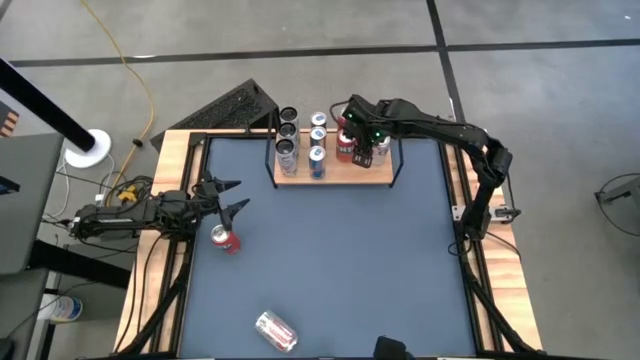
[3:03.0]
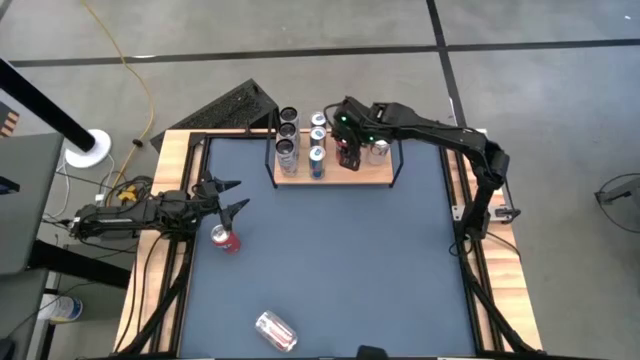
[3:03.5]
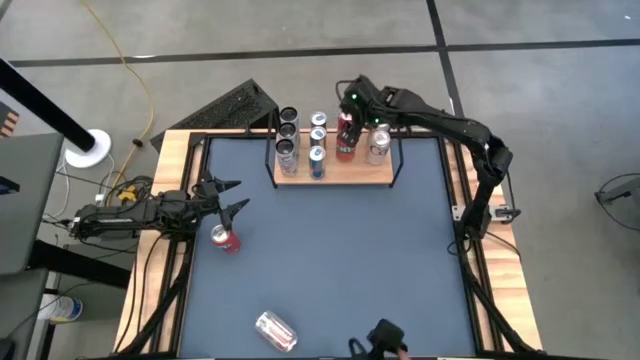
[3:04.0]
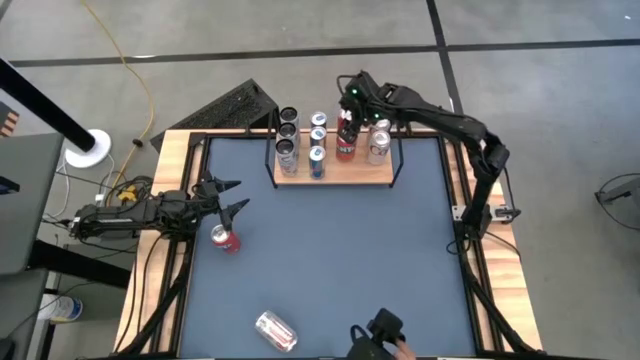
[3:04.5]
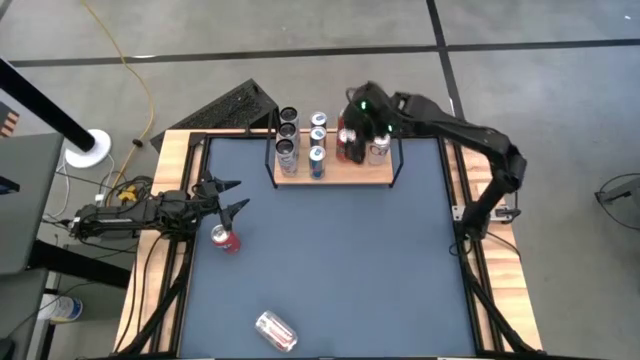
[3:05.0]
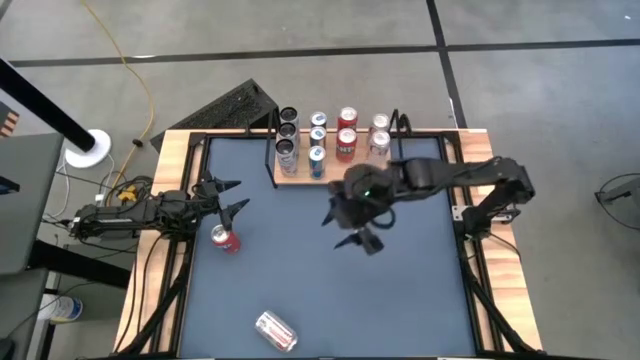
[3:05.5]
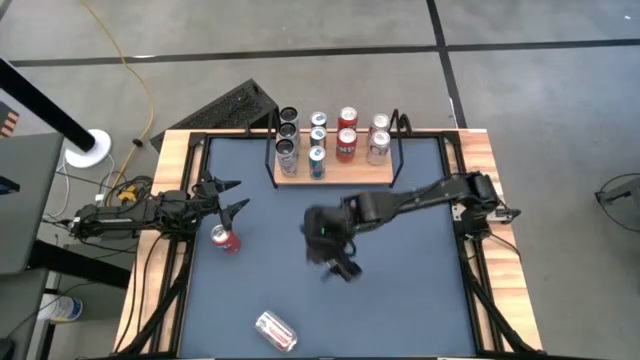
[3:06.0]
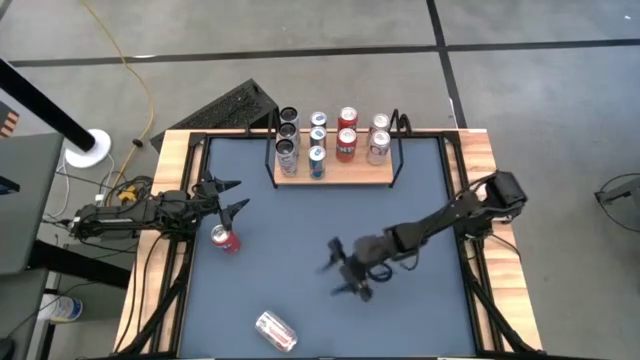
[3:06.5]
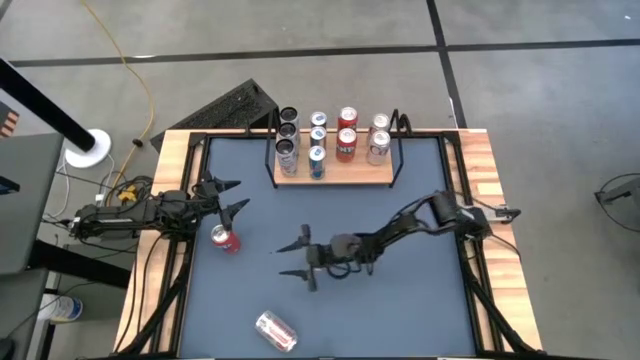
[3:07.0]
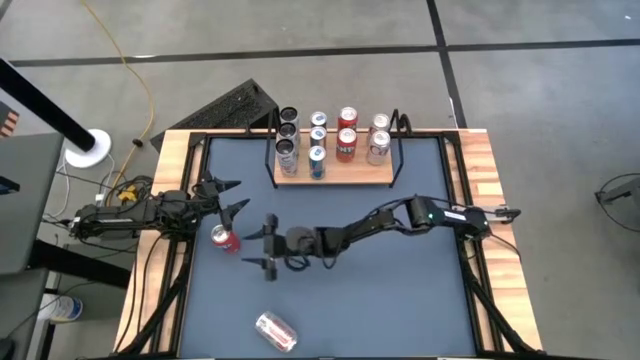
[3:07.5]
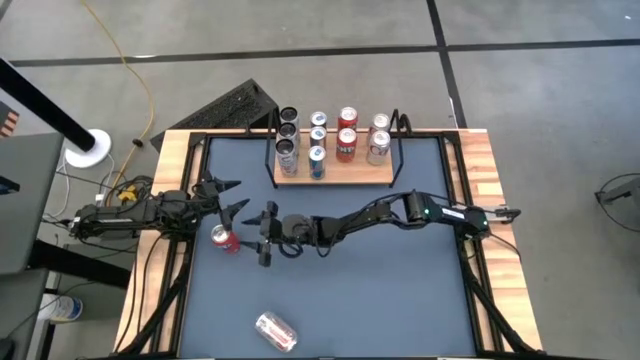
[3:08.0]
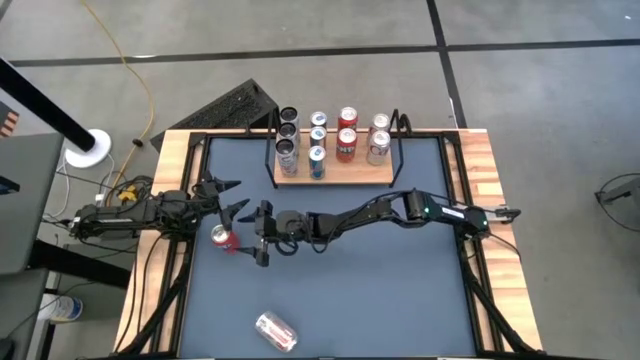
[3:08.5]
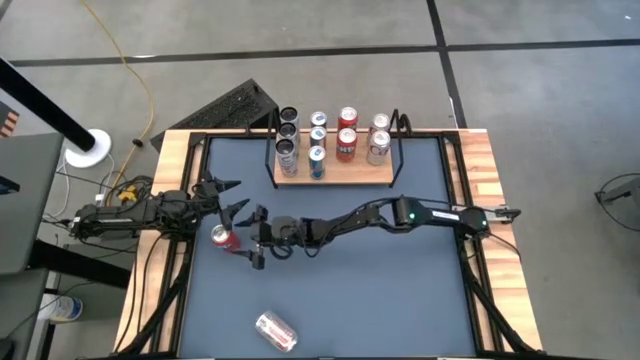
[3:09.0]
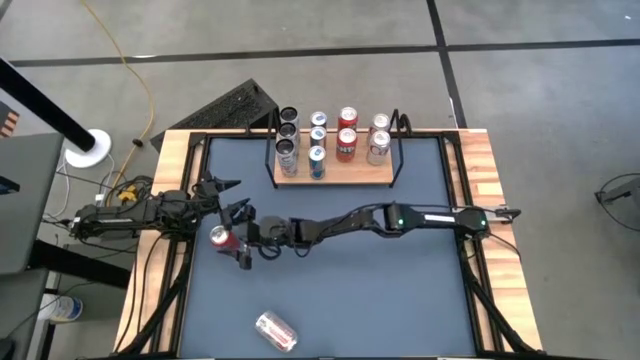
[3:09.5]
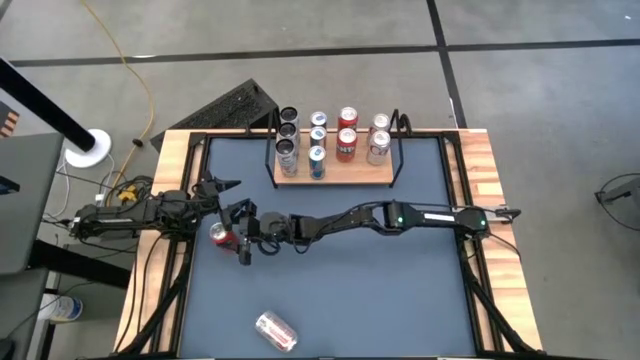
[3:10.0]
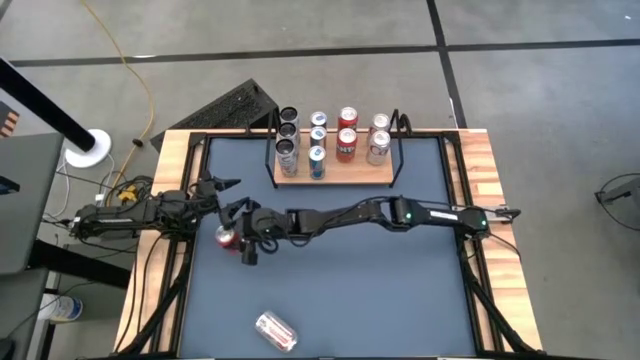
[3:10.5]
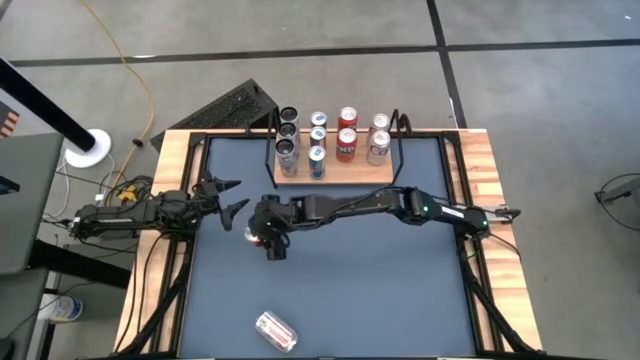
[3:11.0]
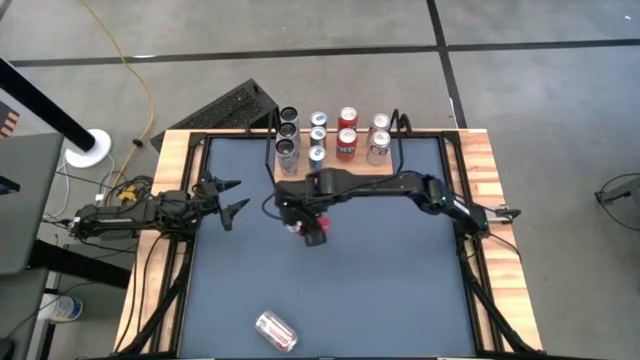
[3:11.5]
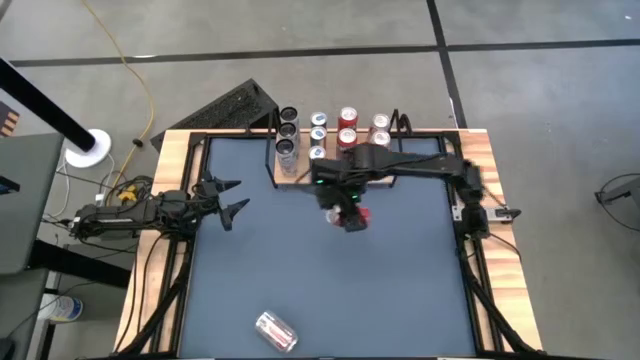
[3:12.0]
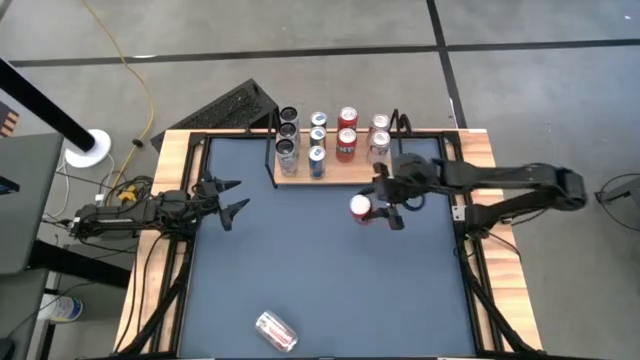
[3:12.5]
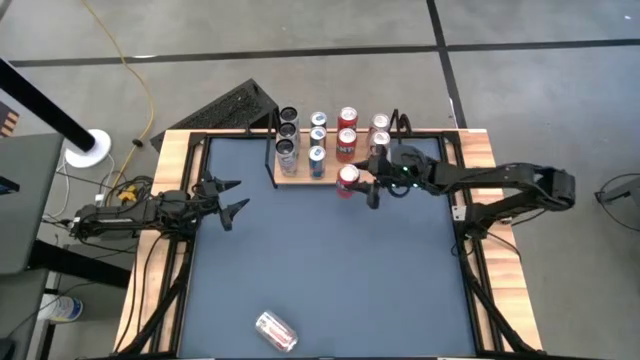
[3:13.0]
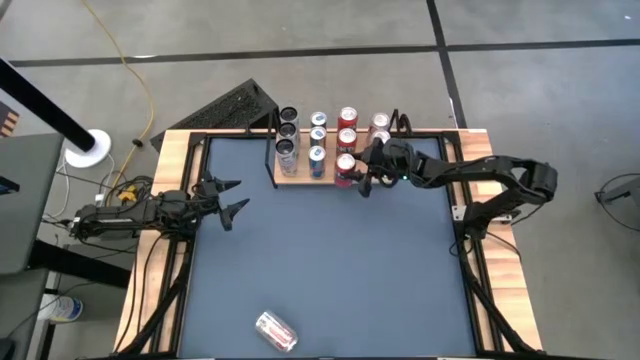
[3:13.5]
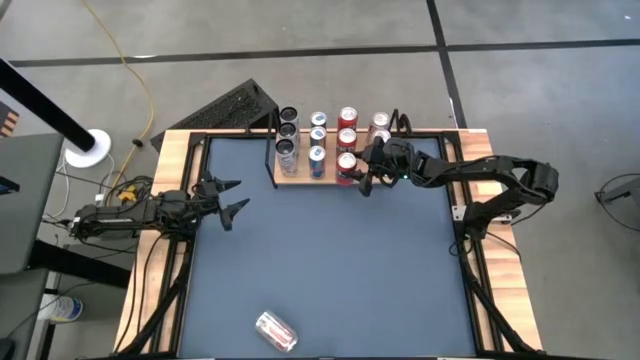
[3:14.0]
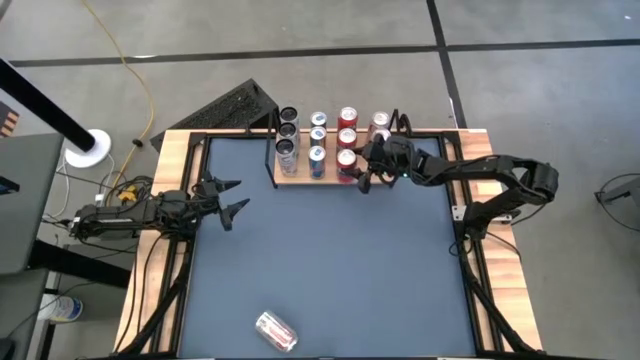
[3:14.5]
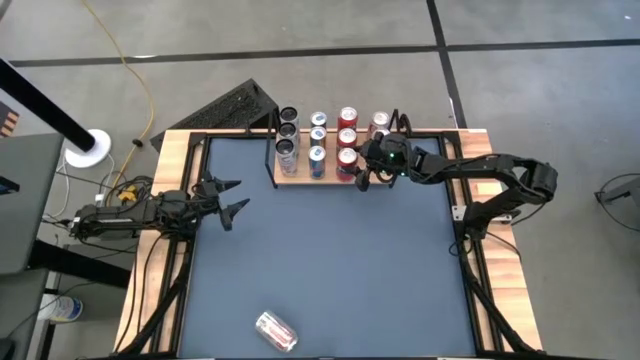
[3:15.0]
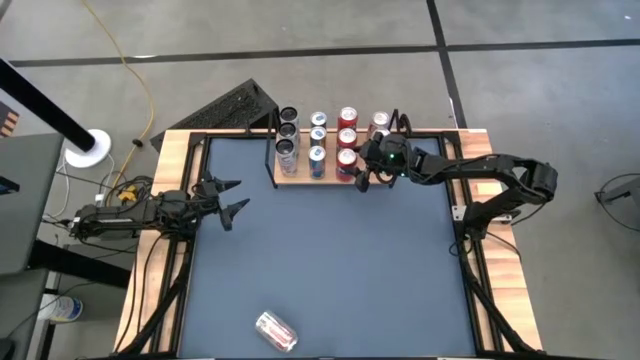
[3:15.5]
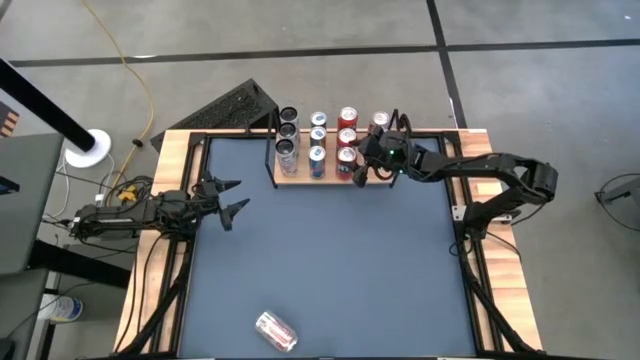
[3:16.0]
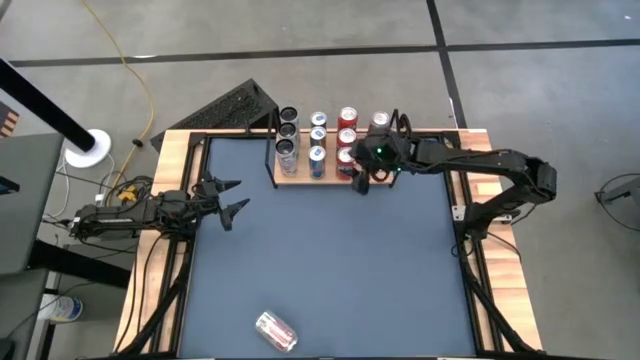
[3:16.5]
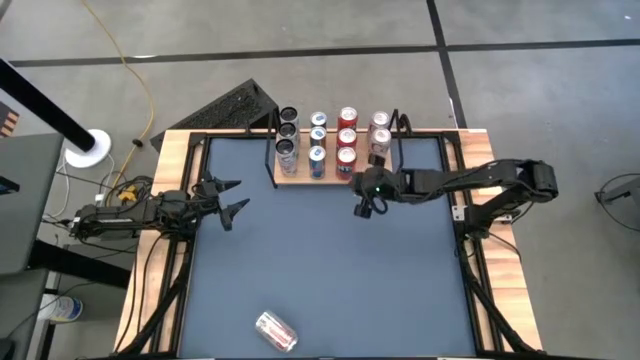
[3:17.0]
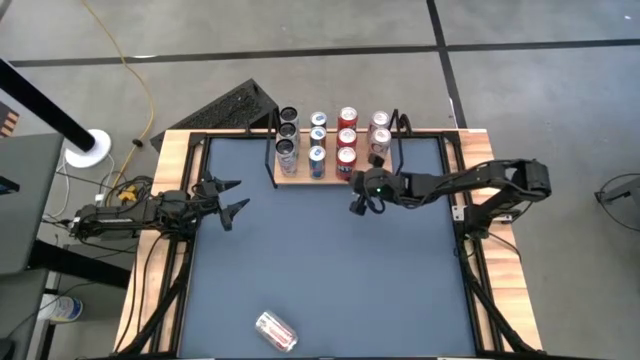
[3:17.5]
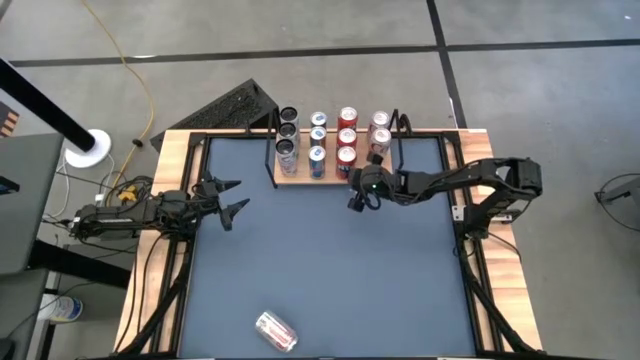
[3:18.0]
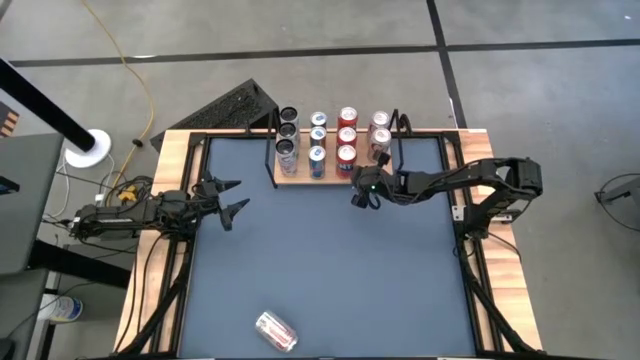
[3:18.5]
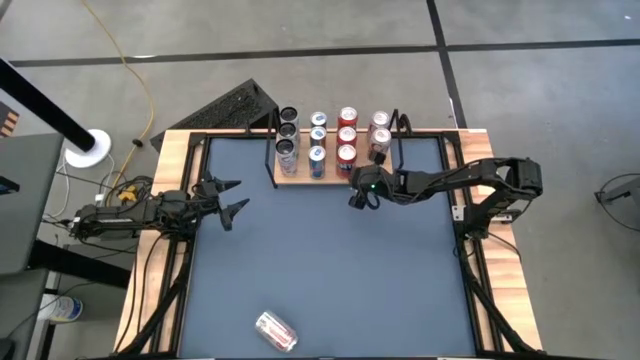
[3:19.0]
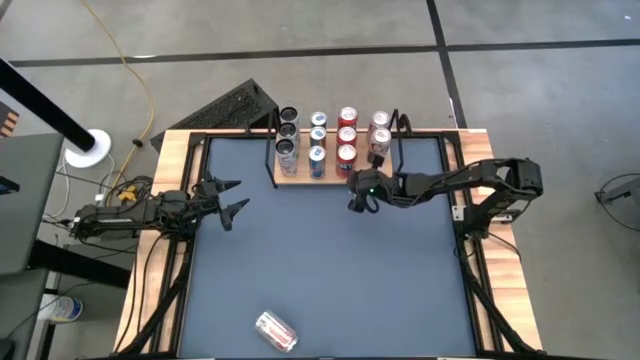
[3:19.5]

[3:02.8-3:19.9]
Task: Place canned beverage on shelf
Put the red soda can on the shelf aligned with the other red soda cans

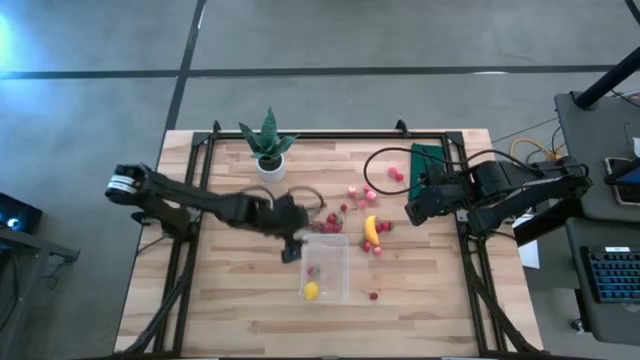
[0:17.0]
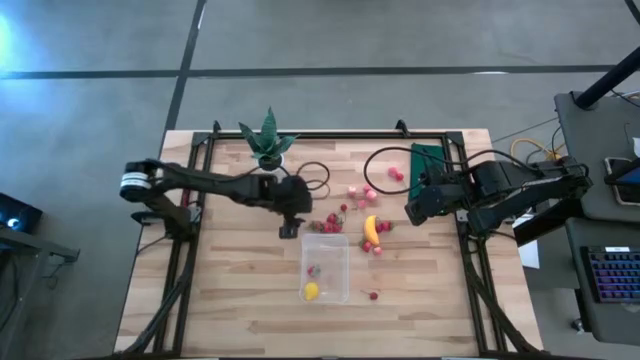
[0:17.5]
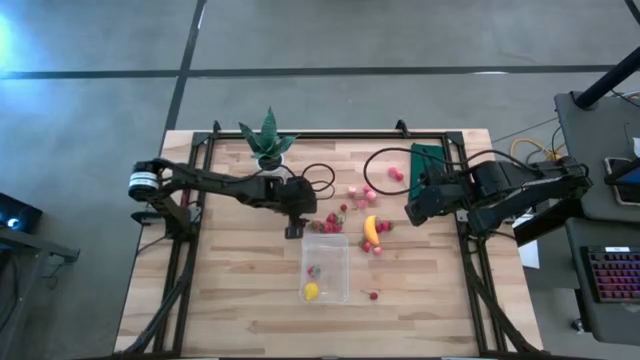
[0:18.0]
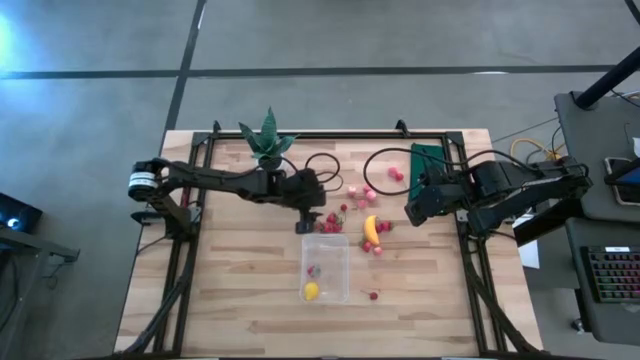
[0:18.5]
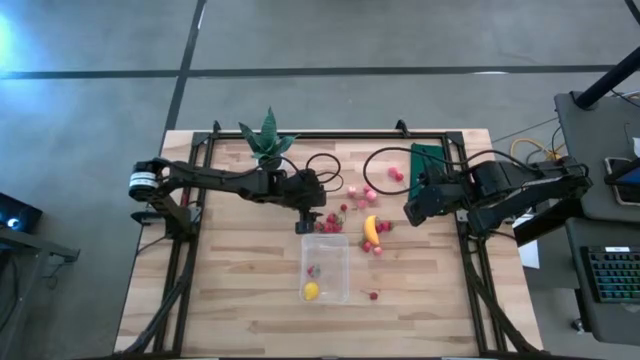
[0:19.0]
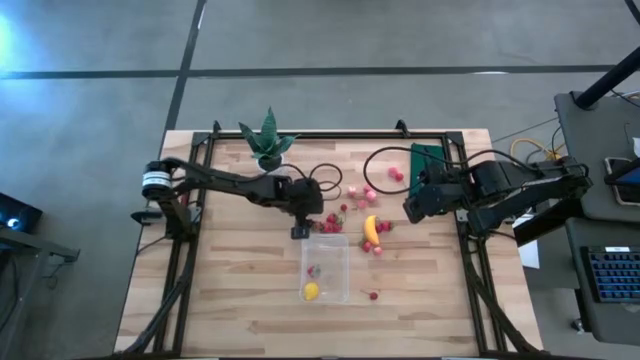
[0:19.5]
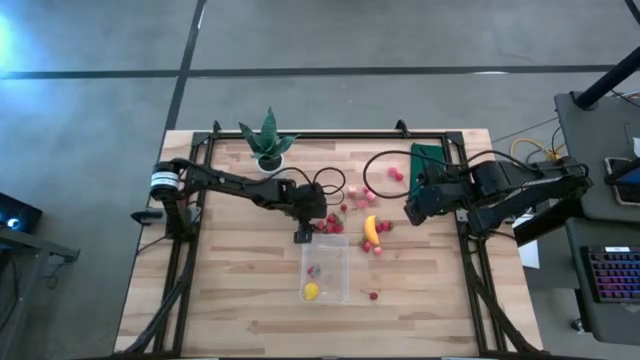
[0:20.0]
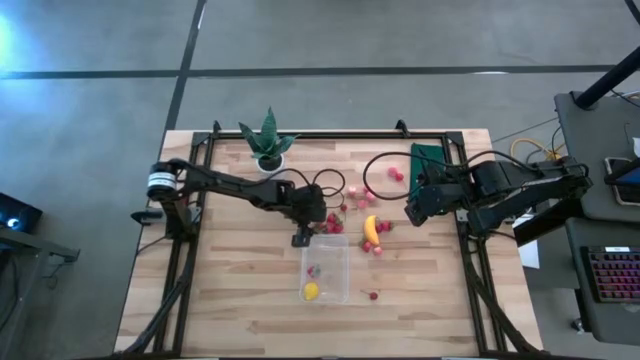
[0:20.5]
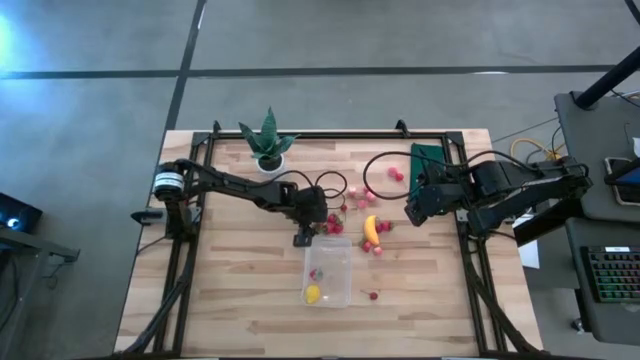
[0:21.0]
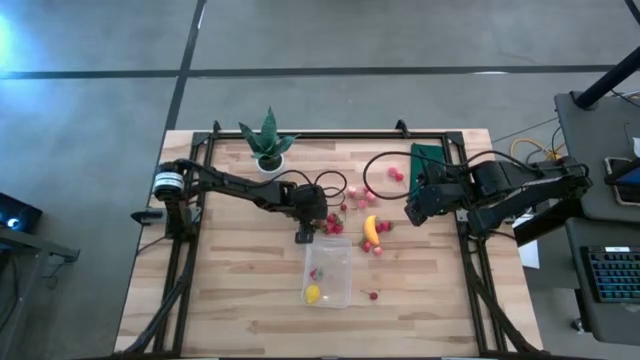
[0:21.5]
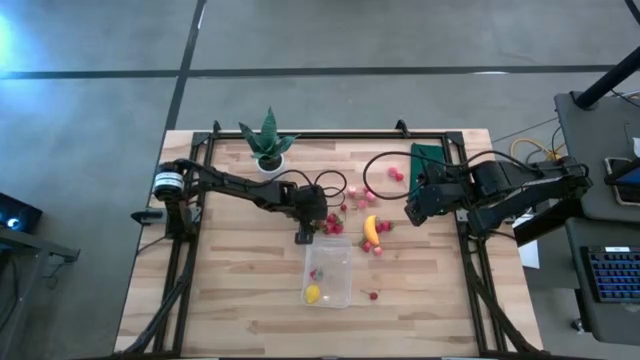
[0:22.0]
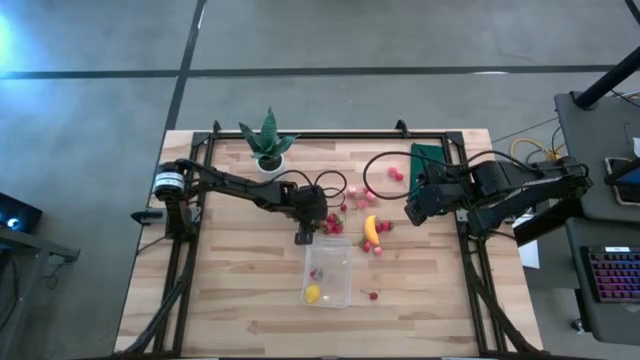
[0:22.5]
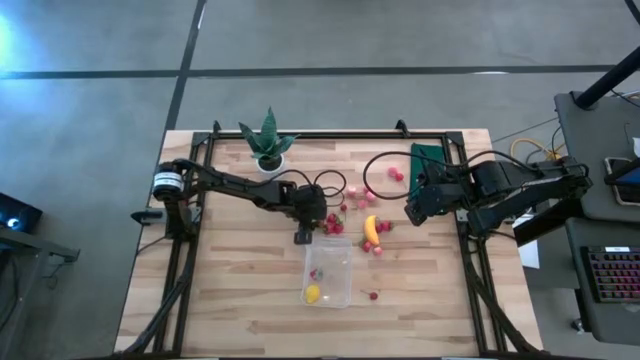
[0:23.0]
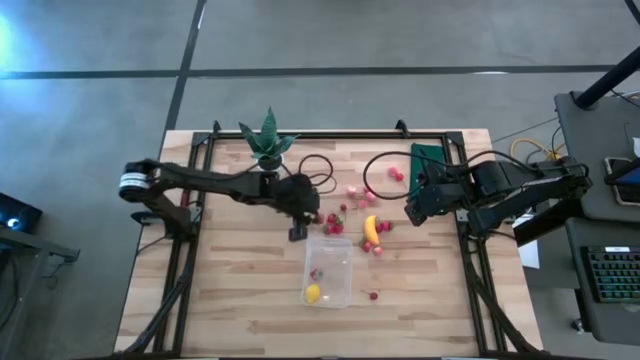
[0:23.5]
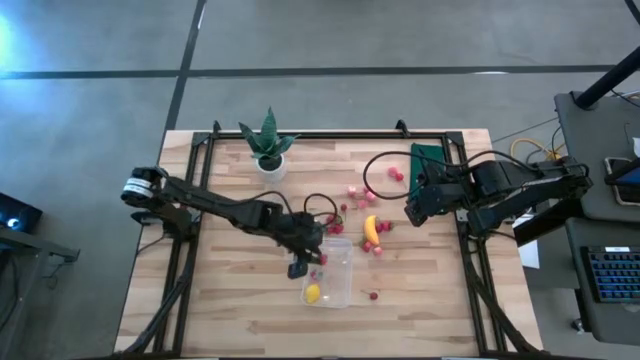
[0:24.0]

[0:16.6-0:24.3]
Task: Pick and placing Produce into tupperware
Put the strawberry into the transparent bin
